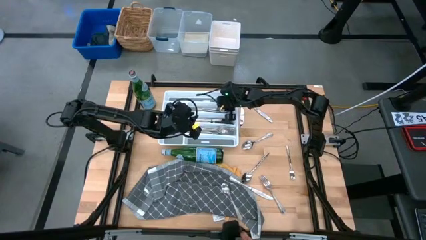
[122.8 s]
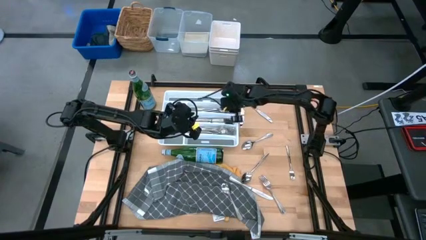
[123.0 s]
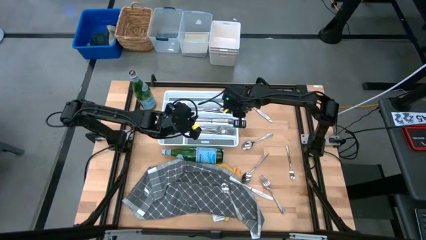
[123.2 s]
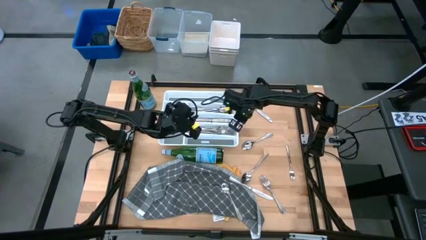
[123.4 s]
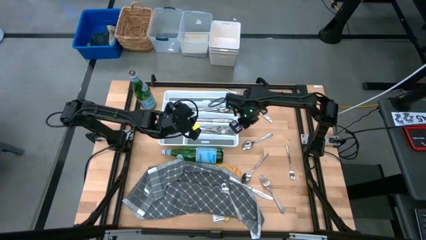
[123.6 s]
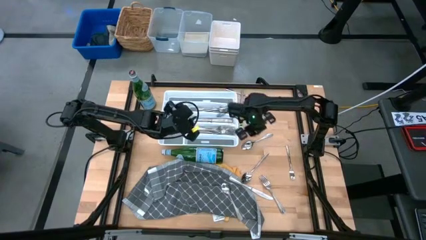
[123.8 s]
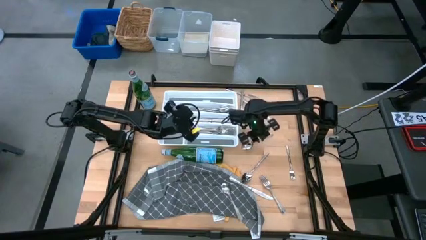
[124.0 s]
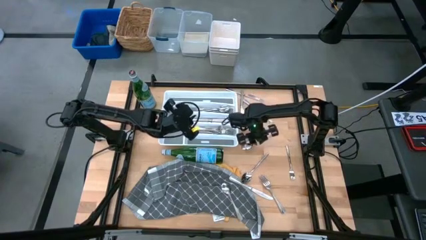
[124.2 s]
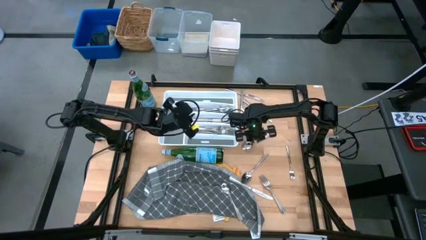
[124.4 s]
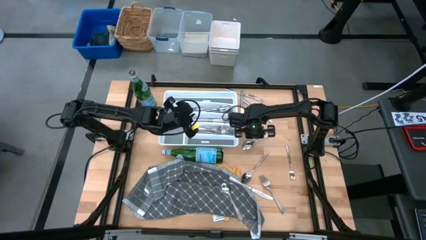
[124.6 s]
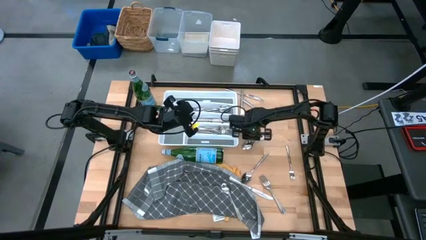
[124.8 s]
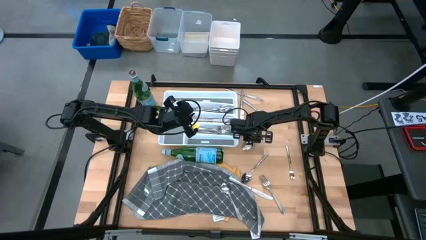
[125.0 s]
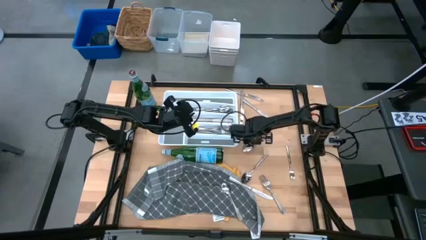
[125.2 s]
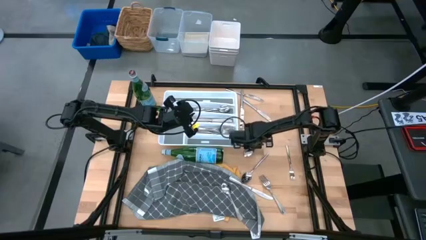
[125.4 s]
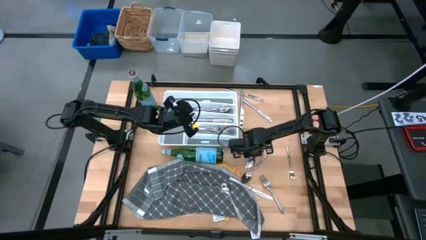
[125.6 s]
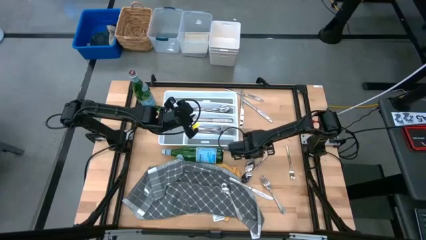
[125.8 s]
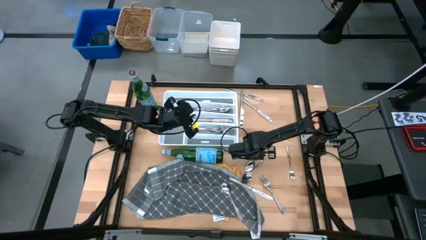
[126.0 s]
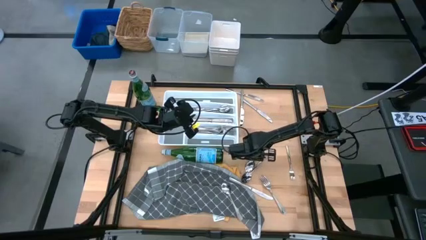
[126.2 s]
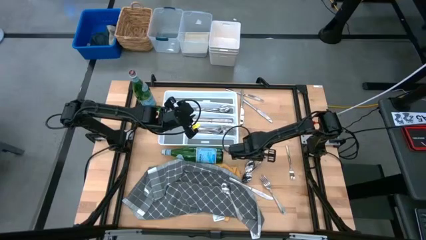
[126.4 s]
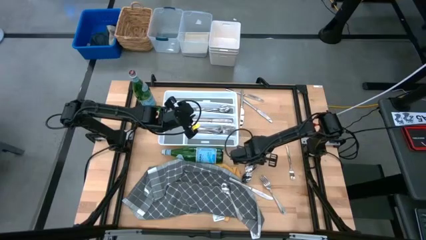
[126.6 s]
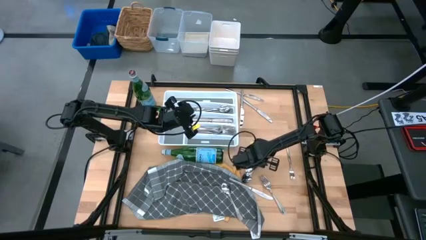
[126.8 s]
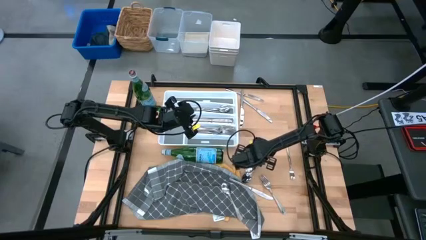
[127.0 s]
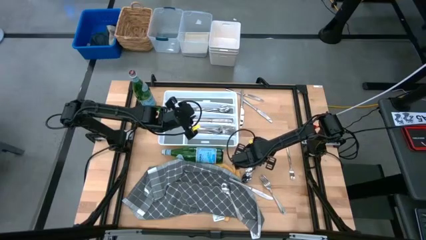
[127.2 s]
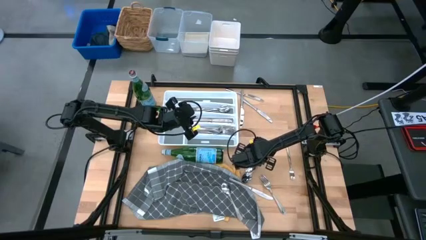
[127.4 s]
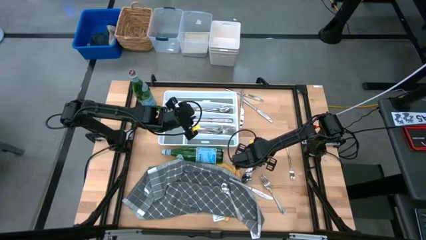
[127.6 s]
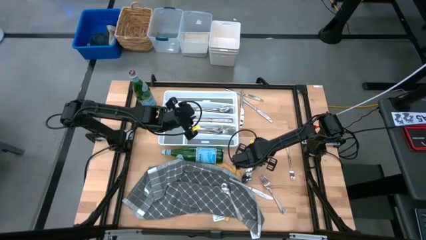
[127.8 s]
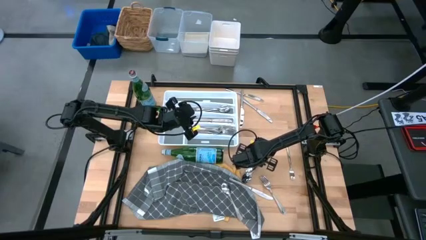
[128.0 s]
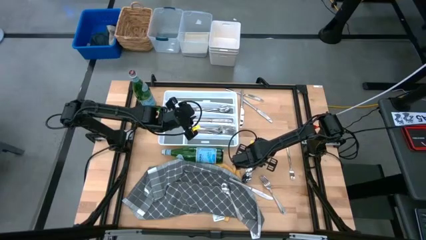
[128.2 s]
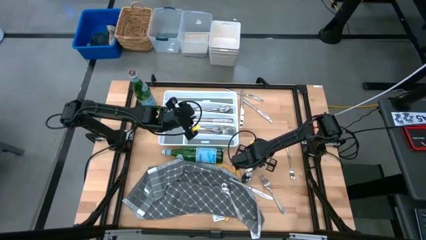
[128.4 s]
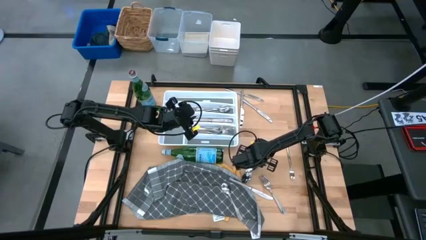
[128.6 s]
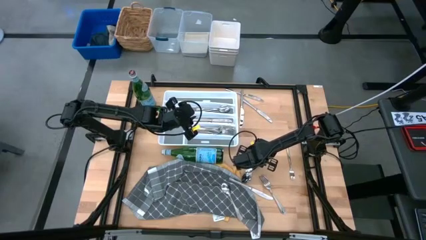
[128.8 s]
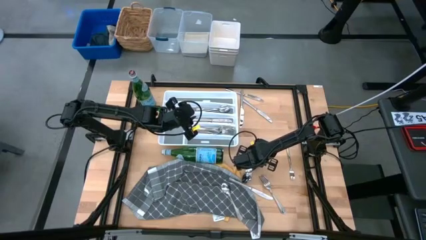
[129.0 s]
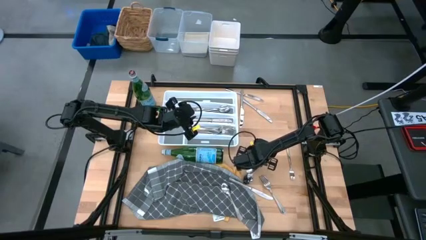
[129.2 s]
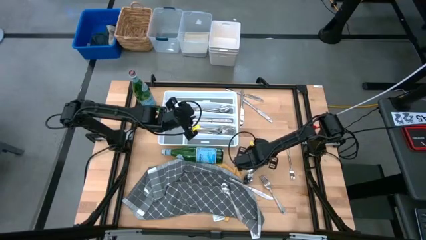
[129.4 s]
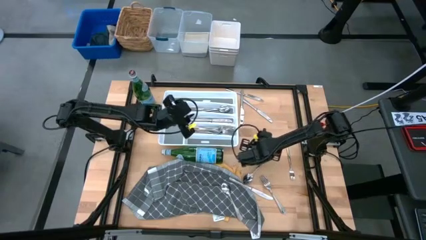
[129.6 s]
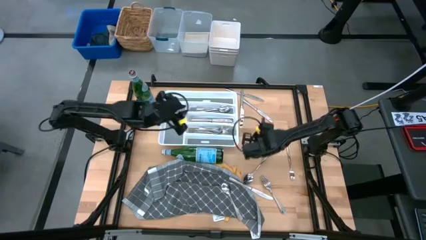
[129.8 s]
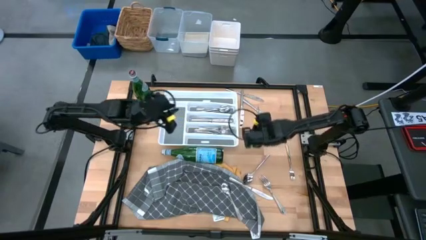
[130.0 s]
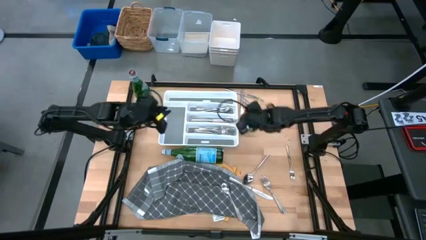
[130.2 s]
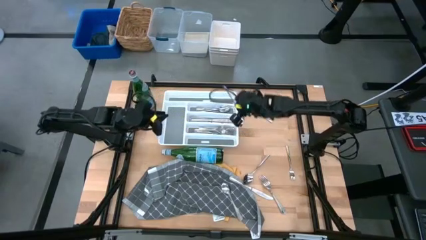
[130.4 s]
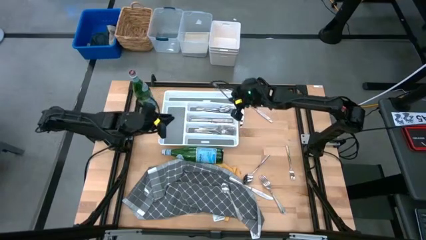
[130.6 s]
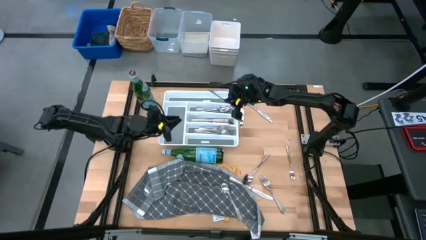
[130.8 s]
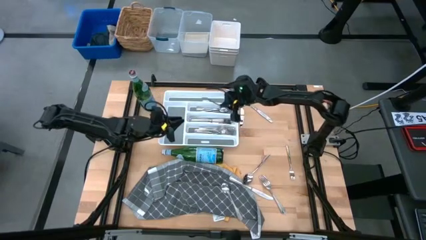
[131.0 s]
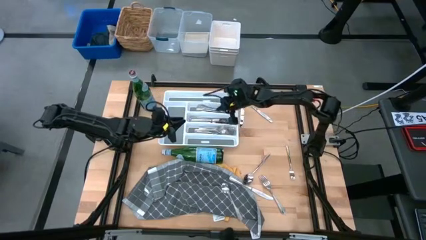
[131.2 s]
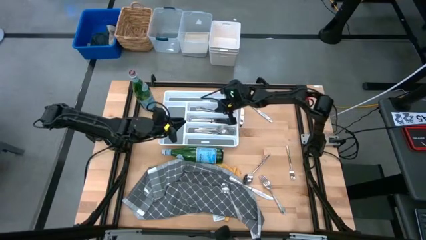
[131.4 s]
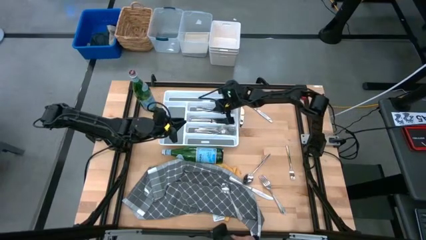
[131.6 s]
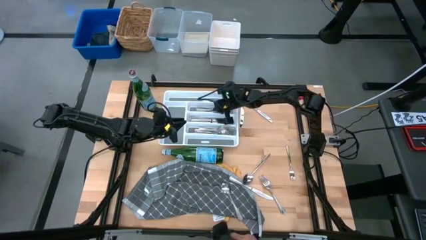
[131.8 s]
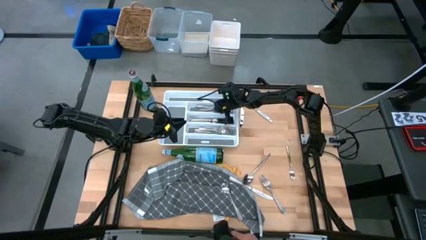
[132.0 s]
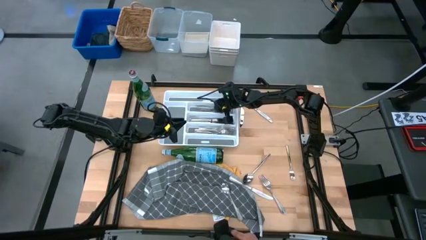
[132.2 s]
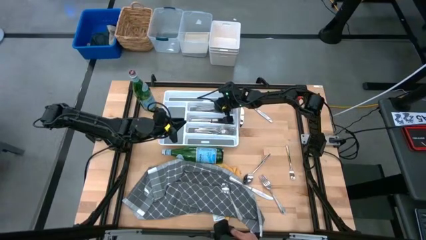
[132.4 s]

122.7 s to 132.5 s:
Task: Sort silverware
Put the silver spoon into the silverware tray

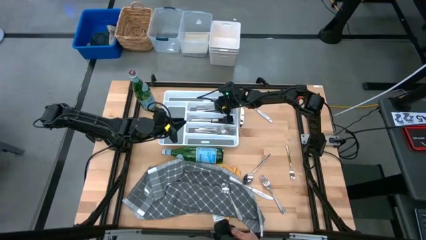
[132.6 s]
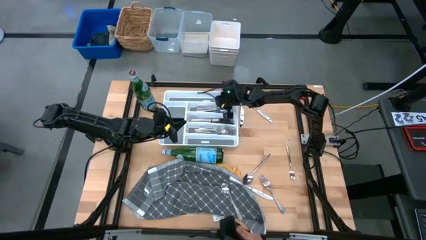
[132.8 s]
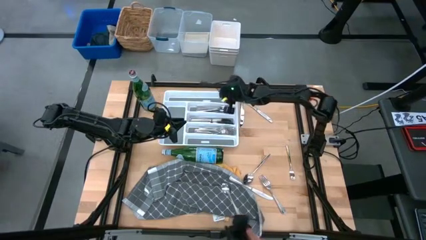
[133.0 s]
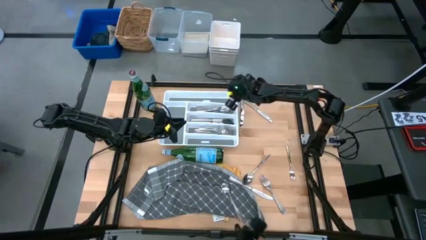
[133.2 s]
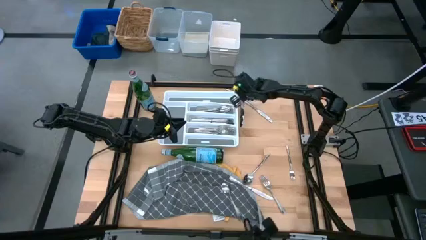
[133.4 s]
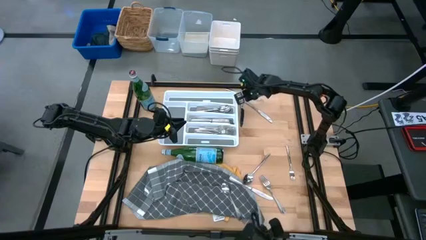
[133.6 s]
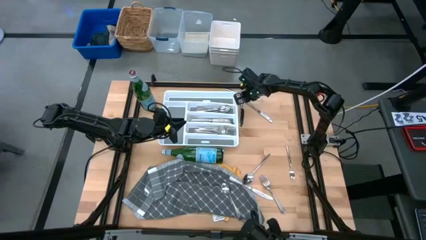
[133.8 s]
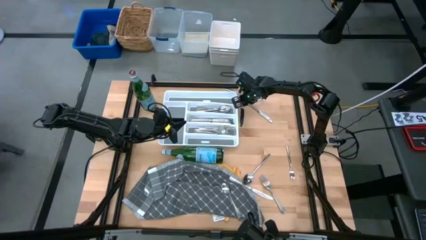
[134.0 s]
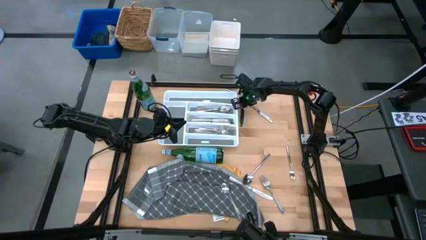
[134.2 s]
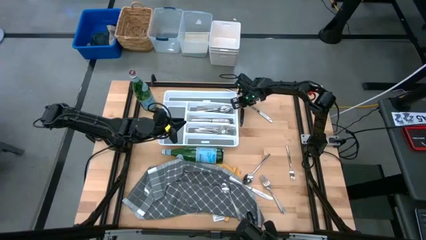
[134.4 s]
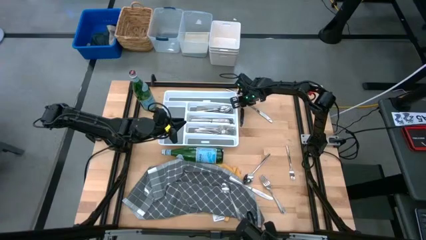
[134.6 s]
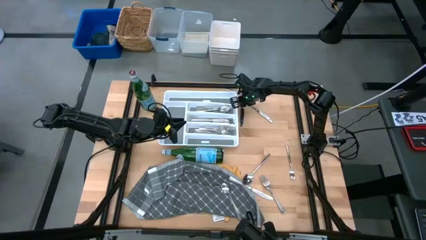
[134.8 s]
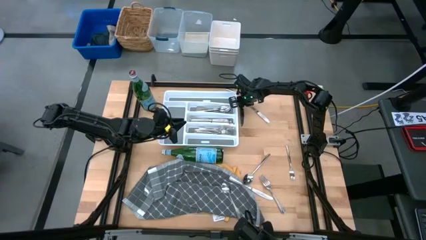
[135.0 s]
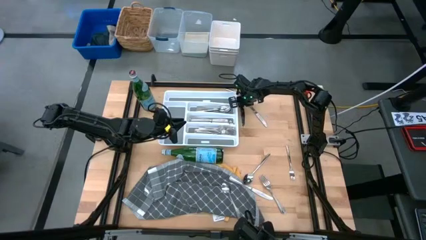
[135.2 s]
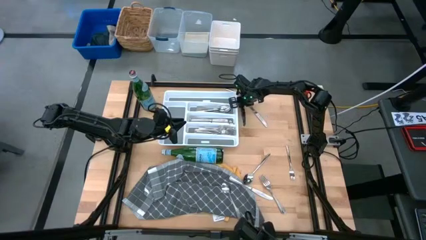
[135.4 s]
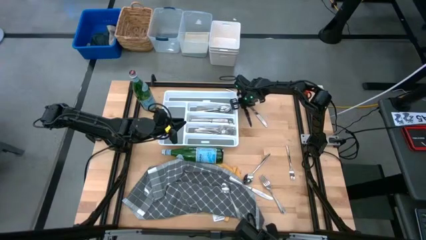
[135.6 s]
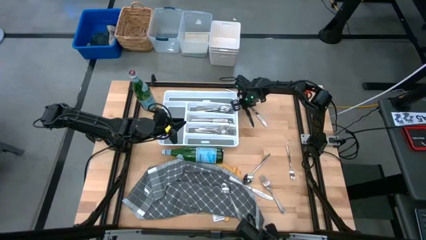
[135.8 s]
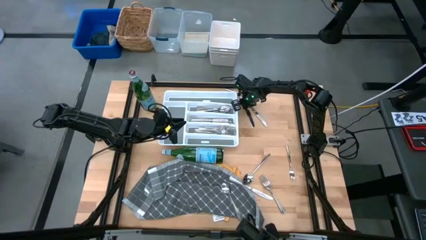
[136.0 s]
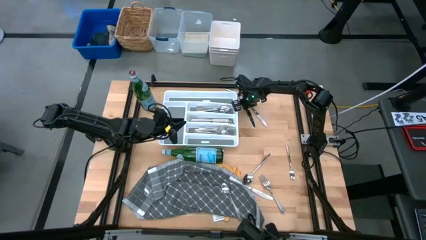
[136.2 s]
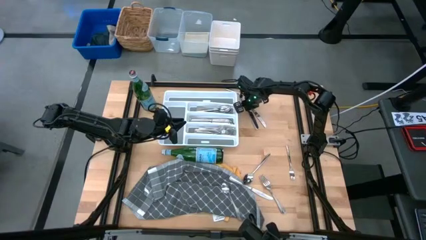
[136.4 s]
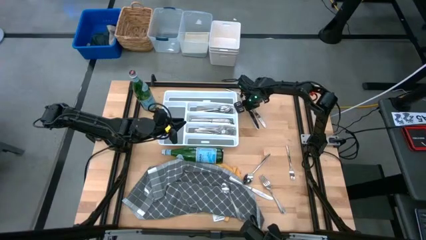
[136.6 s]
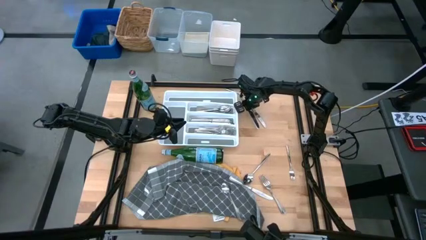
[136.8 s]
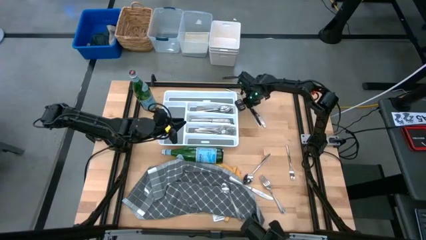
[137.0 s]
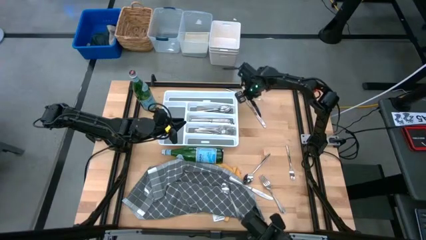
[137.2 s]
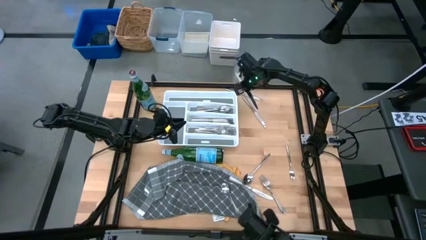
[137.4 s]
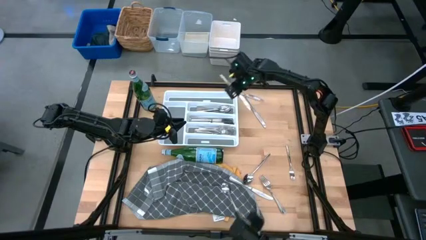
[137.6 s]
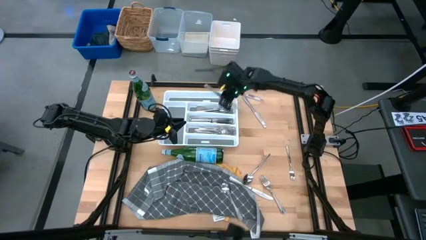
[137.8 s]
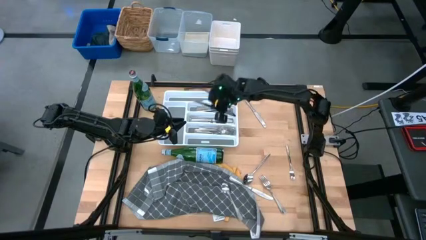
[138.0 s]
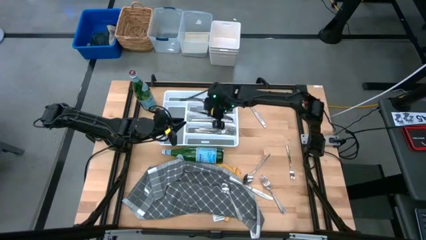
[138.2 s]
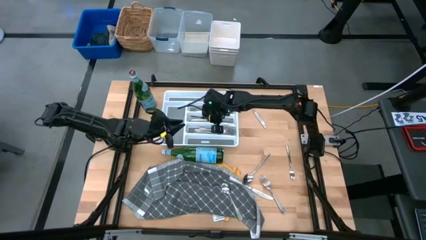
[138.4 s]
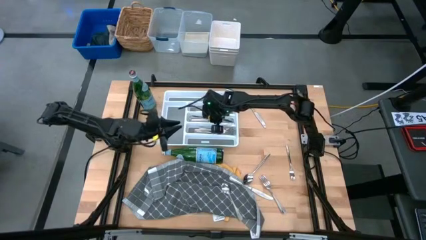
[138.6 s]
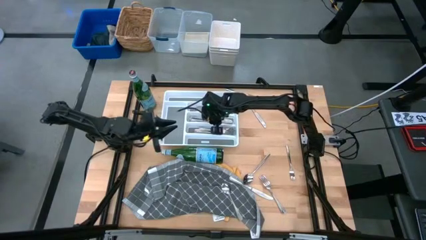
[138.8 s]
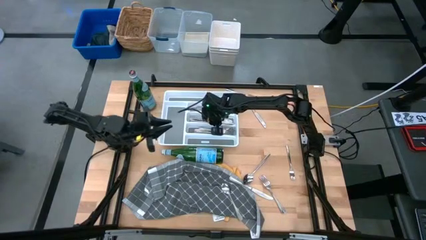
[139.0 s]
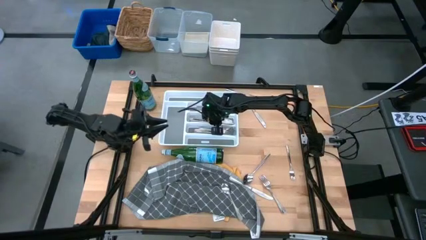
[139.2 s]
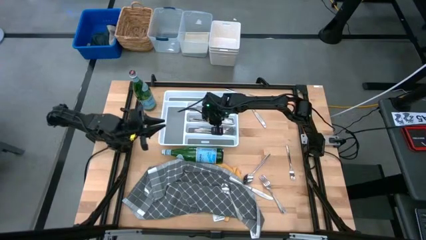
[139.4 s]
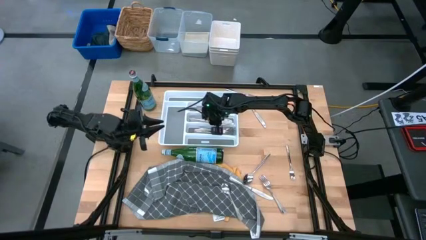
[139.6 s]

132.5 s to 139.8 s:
Put the silver table knife into the silverware tray
